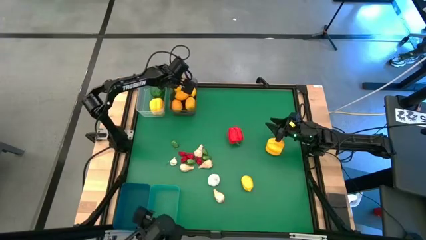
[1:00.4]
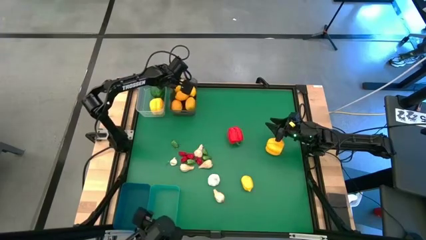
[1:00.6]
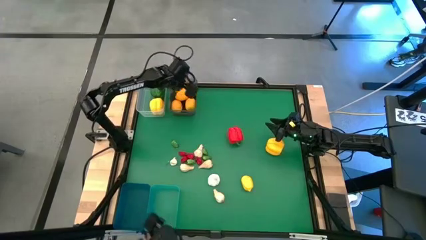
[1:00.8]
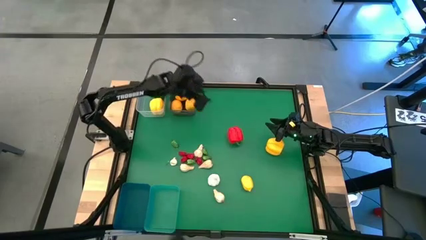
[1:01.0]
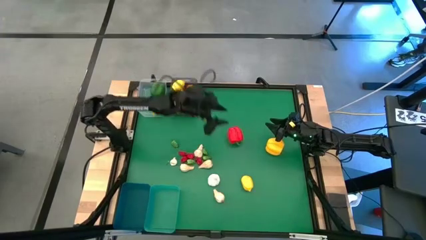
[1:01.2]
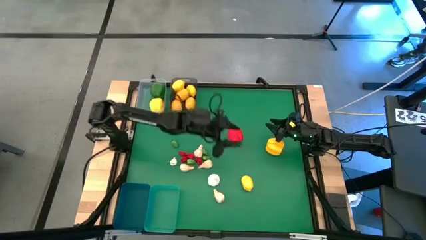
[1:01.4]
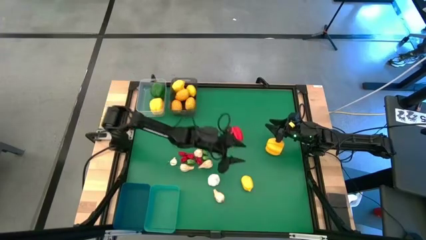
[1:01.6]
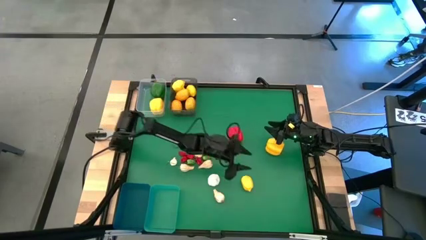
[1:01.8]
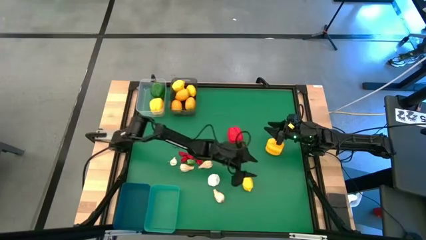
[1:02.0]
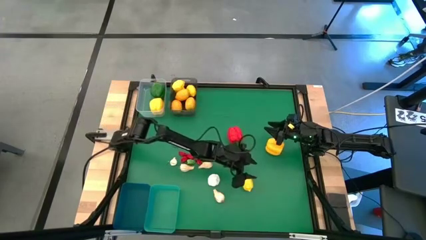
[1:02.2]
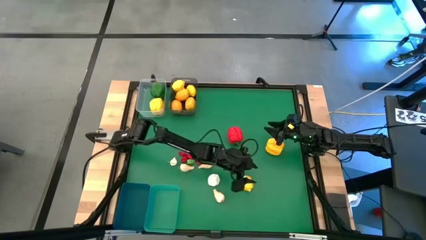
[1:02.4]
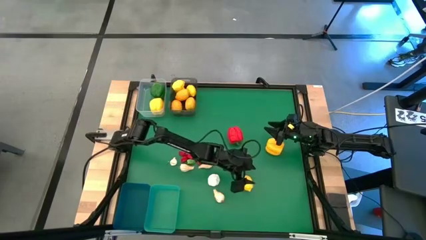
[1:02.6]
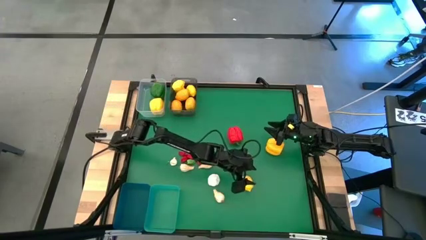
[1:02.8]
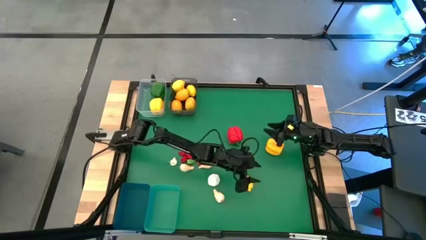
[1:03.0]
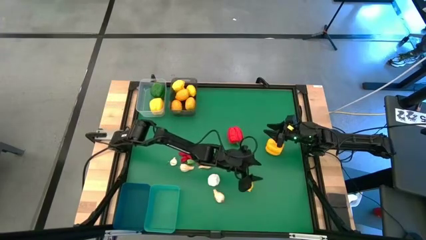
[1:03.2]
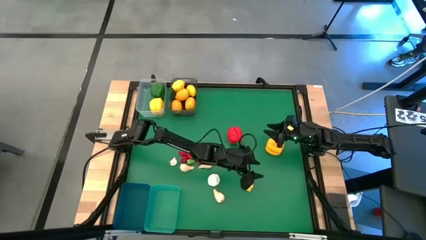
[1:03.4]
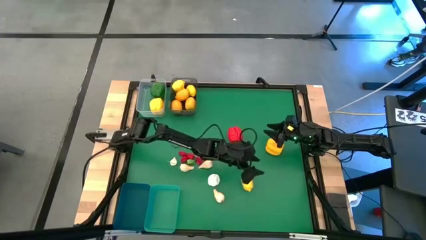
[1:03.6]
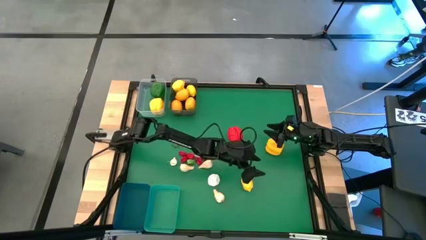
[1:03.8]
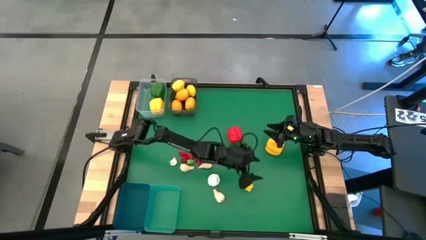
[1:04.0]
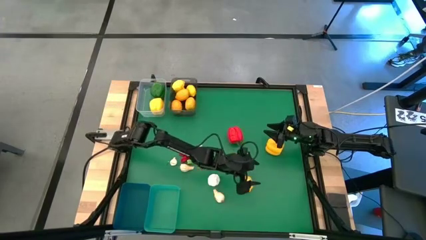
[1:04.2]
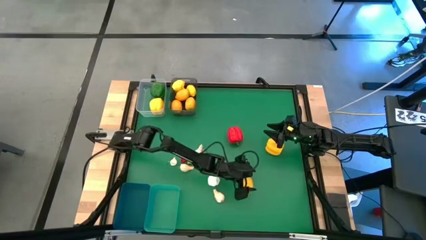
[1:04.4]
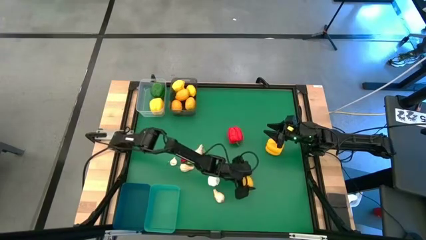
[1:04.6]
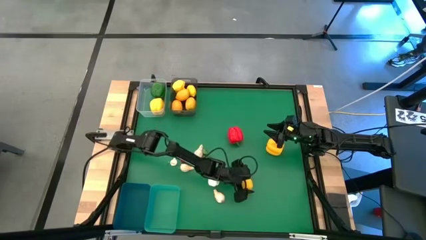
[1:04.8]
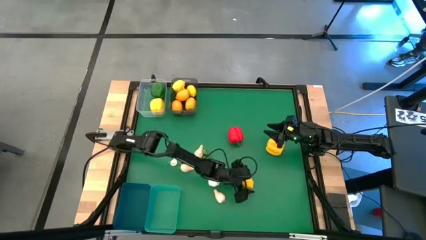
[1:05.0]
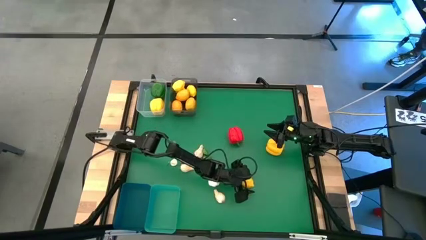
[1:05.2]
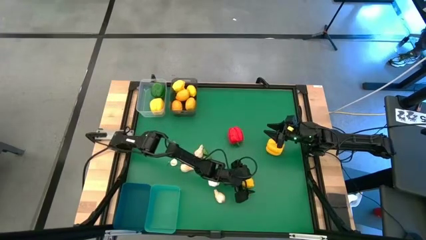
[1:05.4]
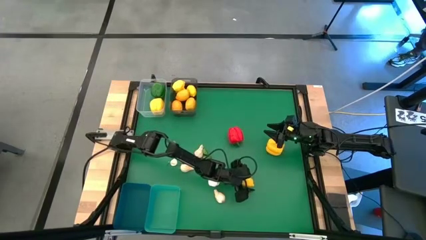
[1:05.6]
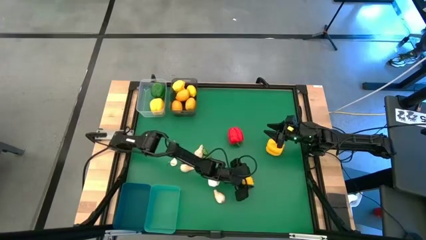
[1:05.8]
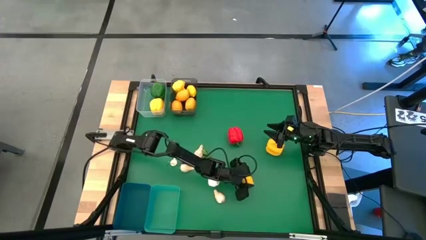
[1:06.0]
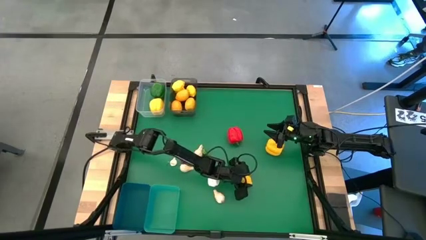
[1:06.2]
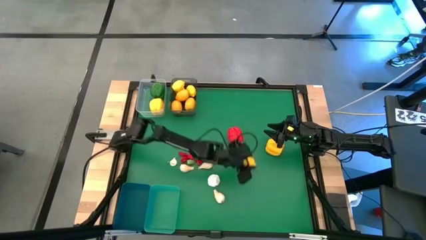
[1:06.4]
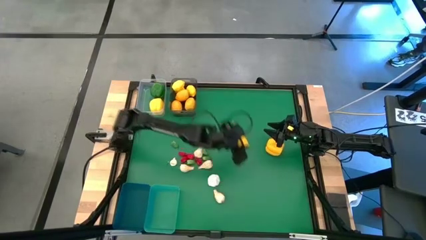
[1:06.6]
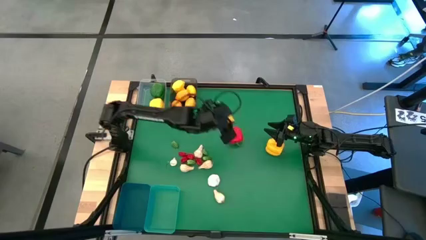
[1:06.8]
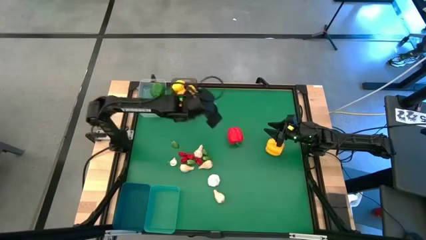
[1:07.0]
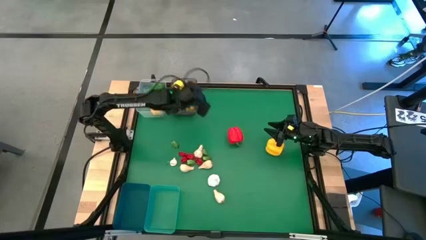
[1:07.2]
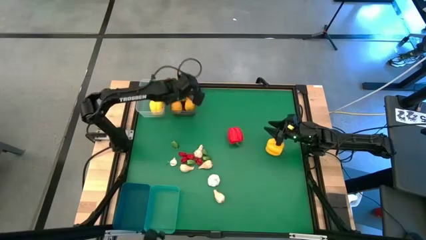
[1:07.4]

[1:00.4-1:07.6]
Task: Sort produce into baskets
Put the lemon into the black bin

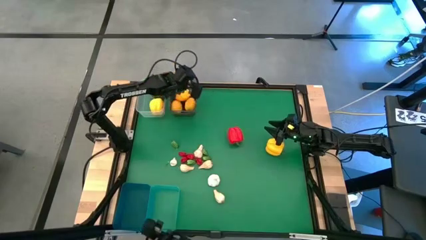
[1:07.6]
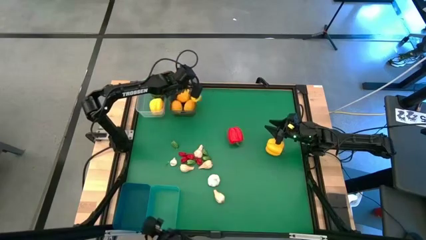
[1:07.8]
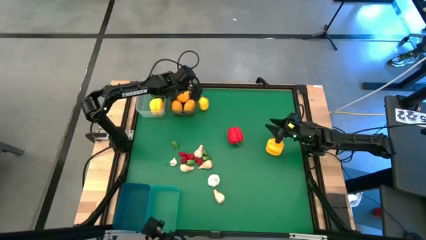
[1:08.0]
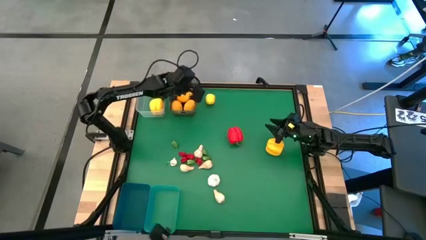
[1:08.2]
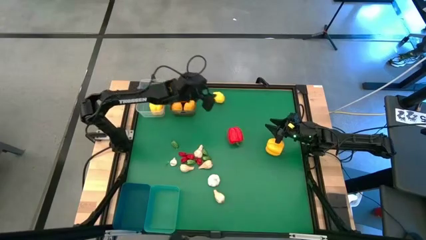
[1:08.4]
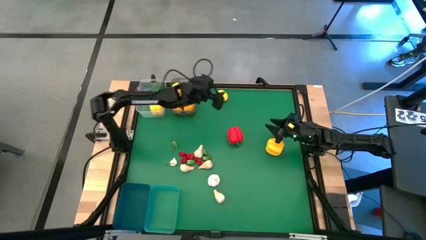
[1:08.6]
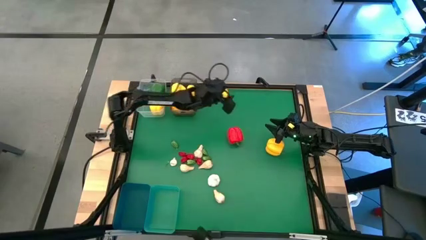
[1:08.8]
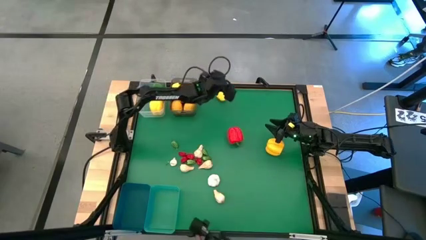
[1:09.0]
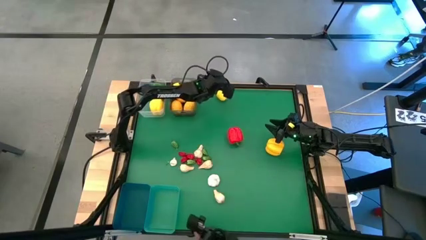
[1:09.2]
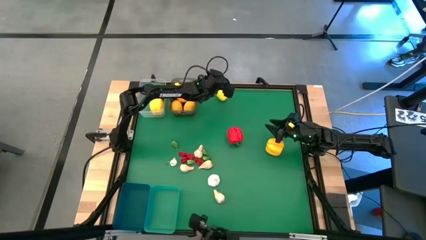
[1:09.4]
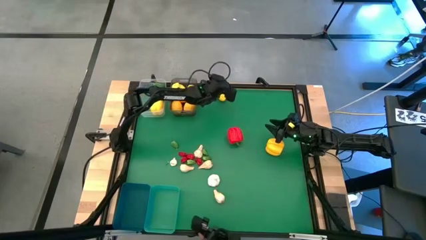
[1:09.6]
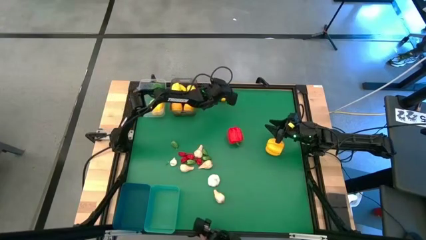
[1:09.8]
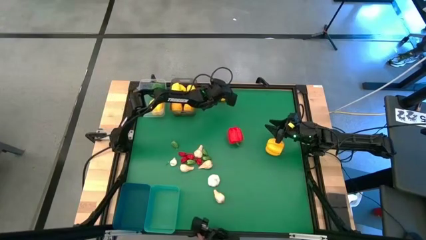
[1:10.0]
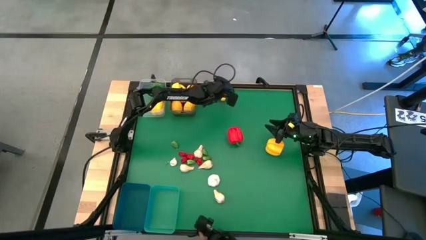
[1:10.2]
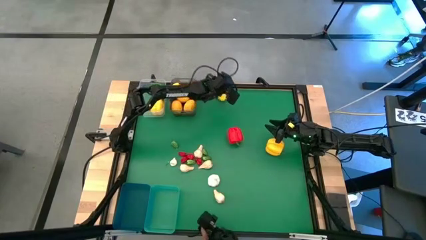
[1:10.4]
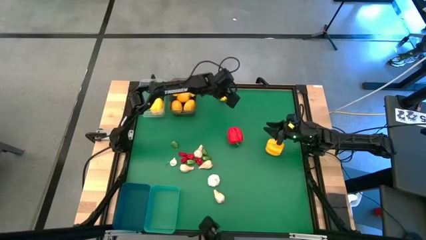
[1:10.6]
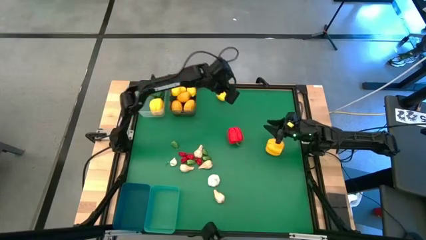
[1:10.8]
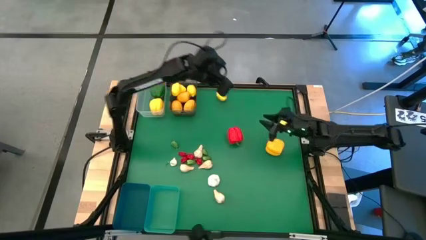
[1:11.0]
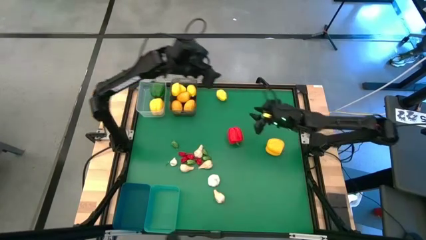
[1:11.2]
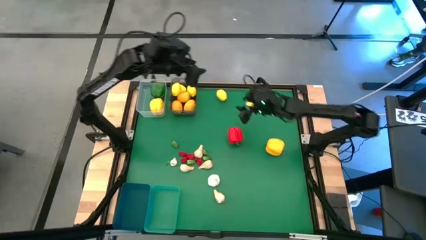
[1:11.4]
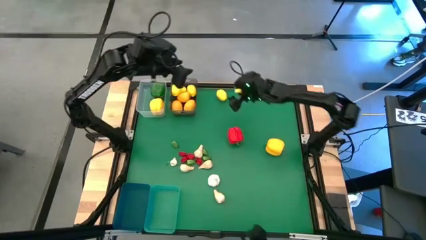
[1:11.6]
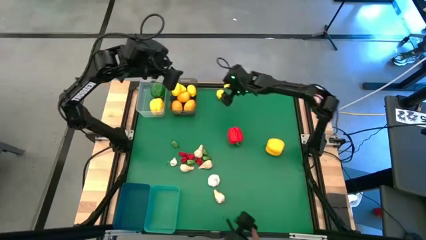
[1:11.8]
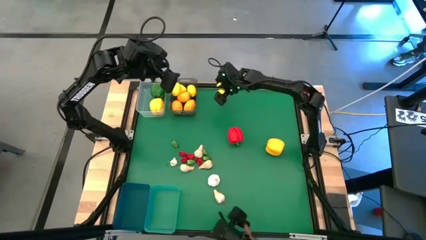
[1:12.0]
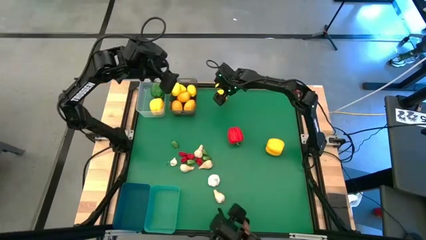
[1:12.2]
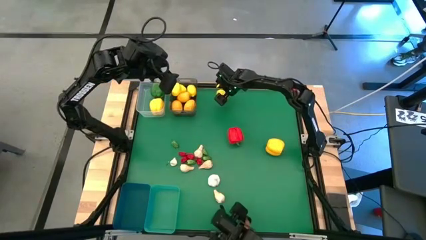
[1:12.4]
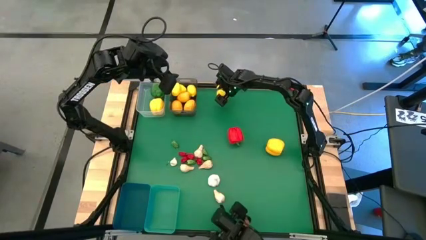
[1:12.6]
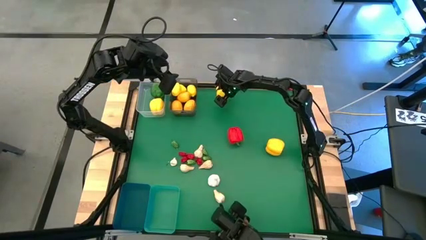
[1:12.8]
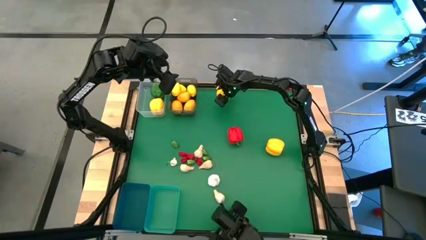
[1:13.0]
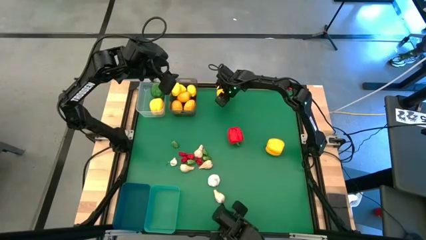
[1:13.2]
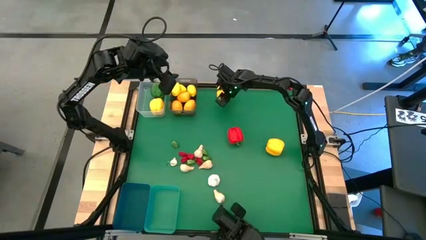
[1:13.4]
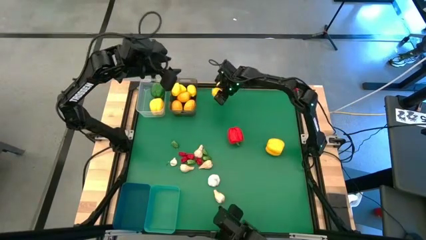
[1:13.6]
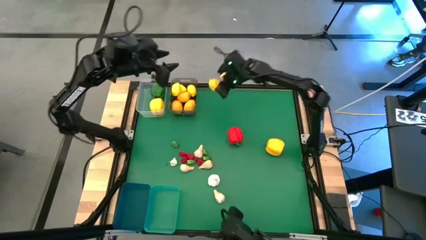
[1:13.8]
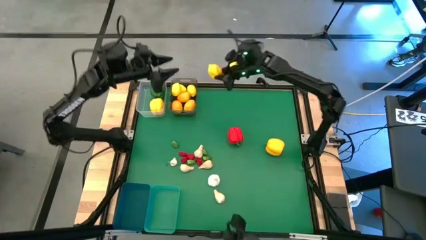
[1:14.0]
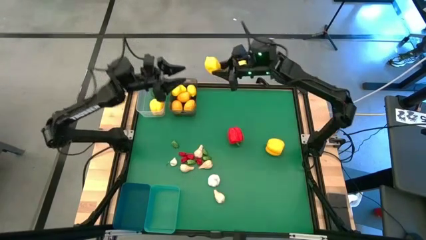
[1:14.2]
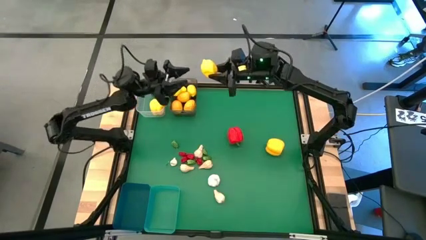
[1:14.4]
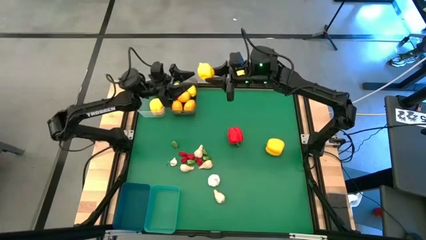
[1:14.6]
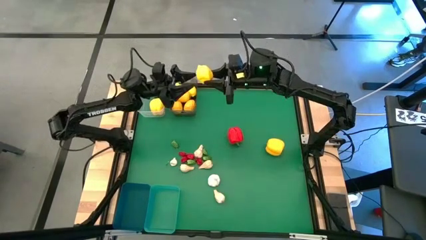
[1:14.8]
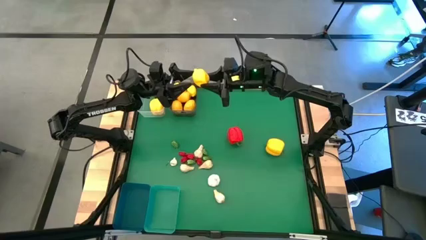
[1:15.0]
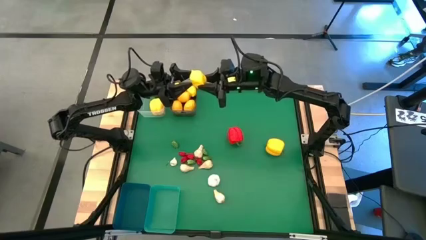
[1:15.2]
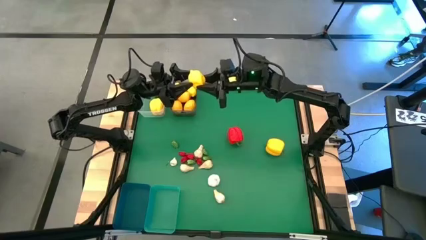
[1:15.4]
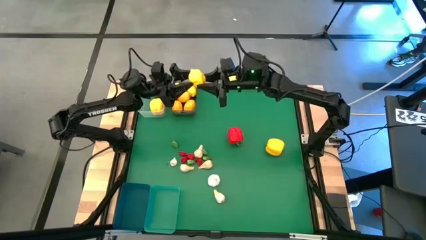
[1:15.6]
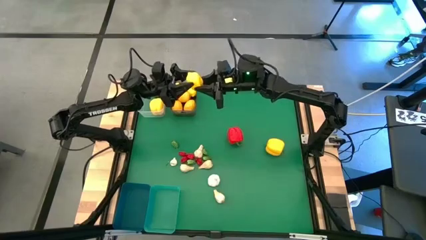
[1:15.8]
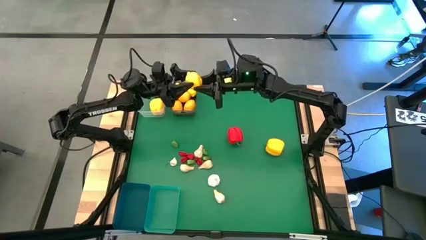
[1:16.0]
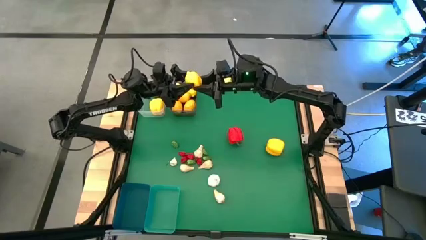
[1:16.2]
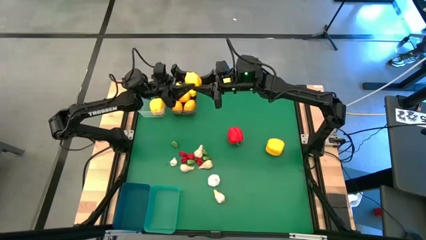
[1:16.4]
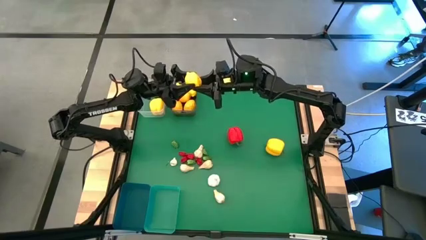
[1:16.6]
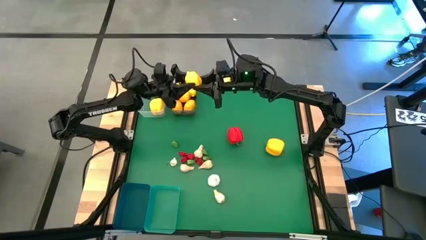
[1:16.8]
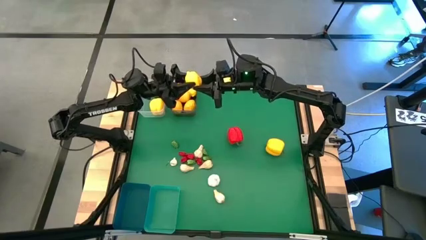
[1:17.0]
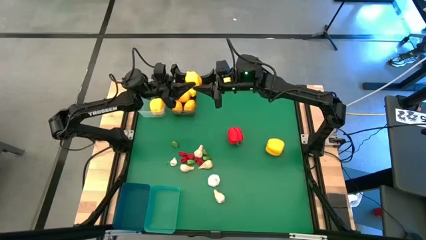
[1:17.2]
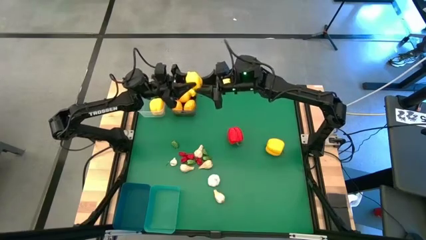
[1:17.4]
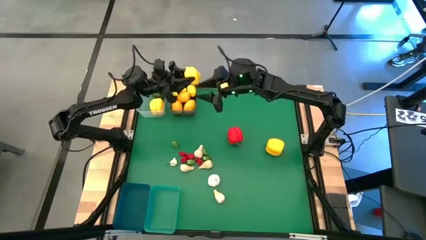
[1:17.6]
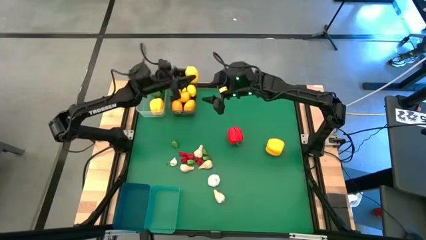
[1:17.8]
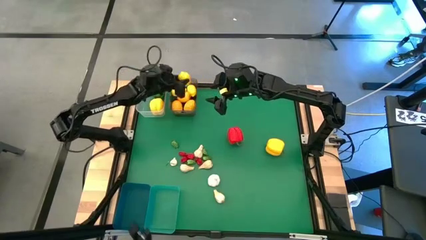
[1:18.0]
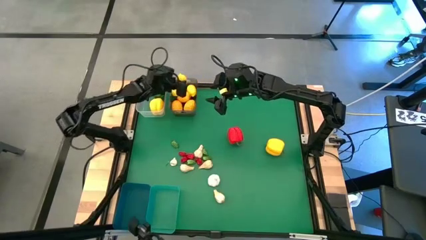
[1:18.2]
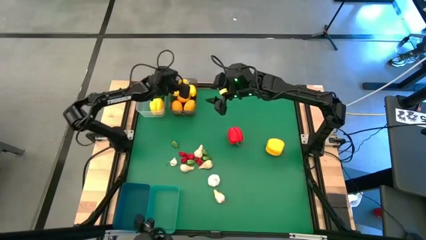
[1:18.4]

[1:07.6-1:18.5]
Put the lemon into the black bin
